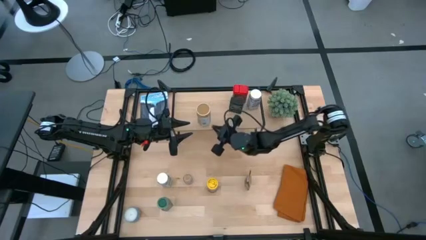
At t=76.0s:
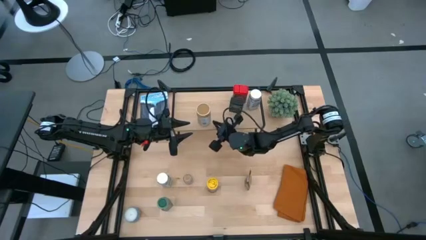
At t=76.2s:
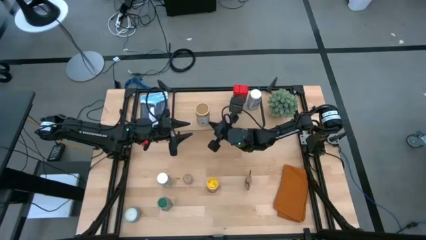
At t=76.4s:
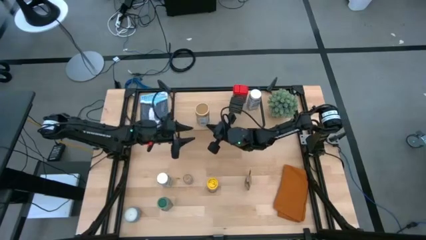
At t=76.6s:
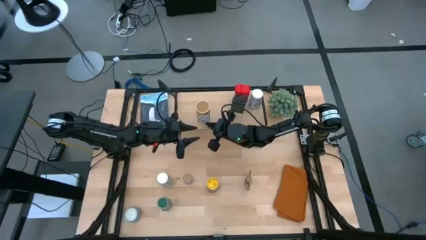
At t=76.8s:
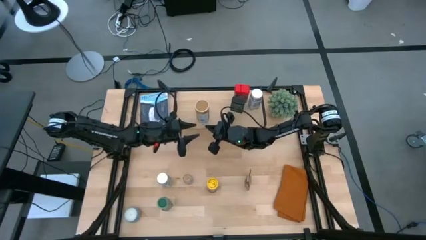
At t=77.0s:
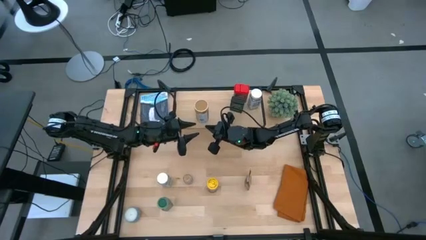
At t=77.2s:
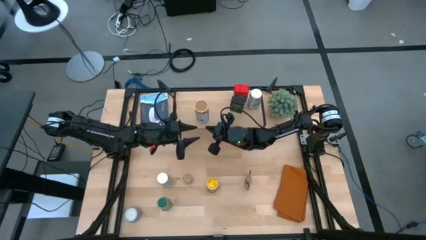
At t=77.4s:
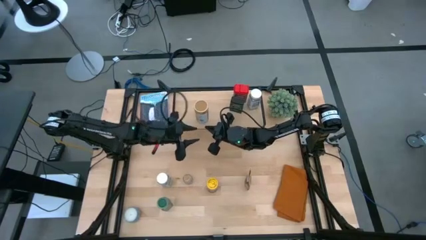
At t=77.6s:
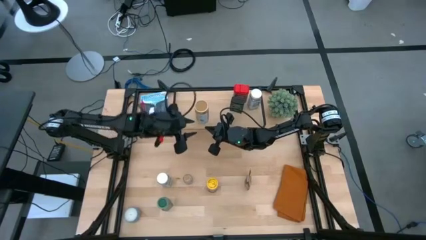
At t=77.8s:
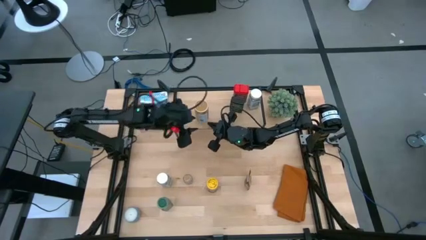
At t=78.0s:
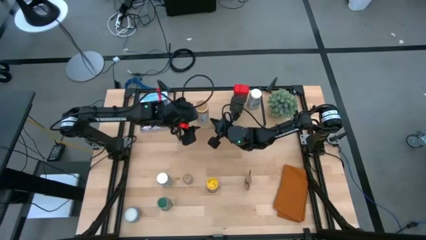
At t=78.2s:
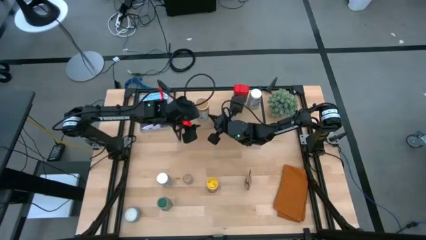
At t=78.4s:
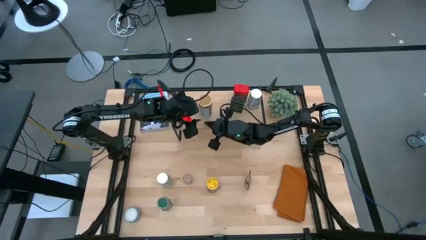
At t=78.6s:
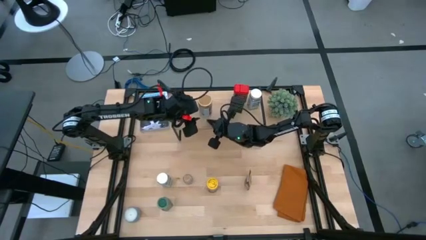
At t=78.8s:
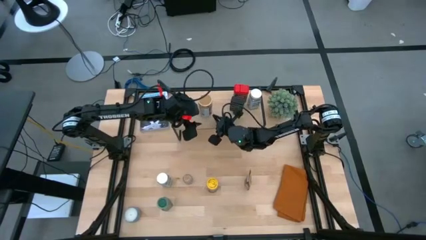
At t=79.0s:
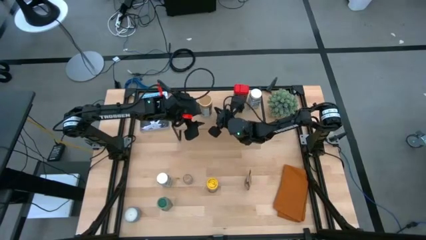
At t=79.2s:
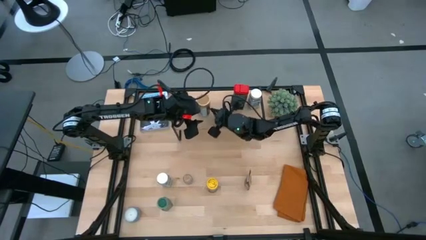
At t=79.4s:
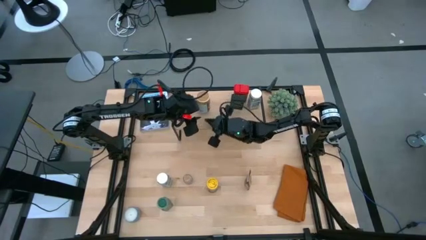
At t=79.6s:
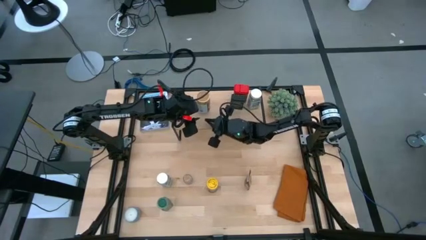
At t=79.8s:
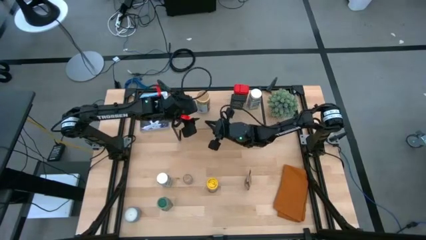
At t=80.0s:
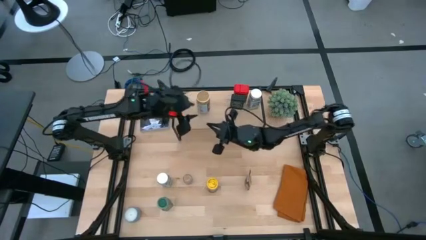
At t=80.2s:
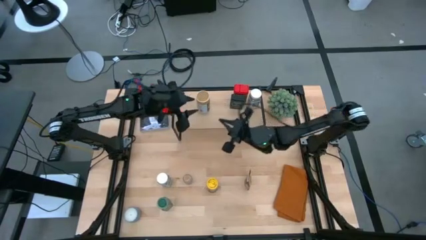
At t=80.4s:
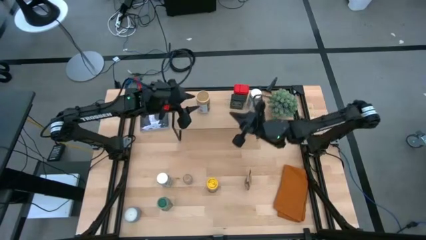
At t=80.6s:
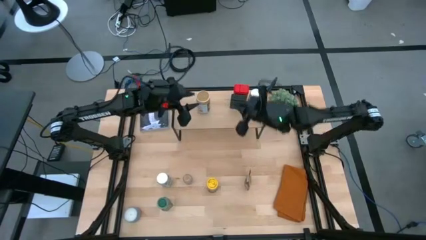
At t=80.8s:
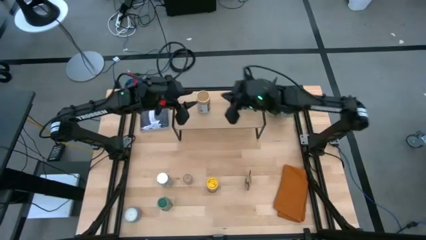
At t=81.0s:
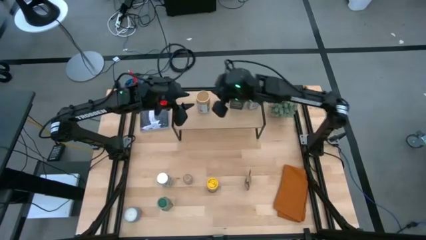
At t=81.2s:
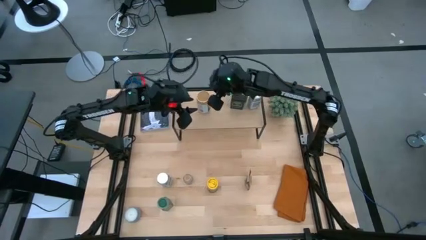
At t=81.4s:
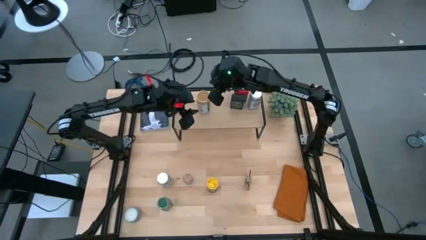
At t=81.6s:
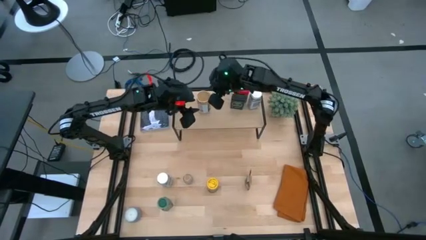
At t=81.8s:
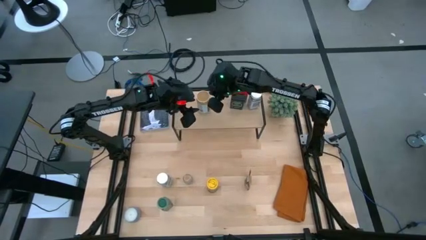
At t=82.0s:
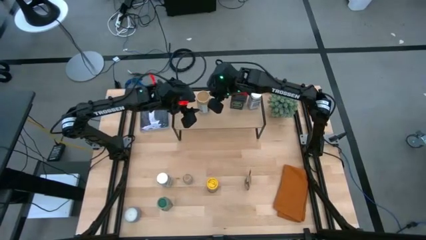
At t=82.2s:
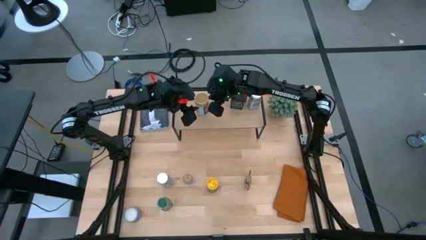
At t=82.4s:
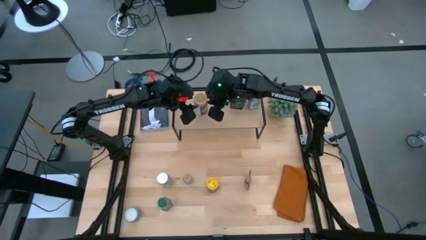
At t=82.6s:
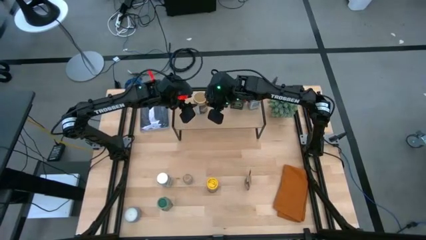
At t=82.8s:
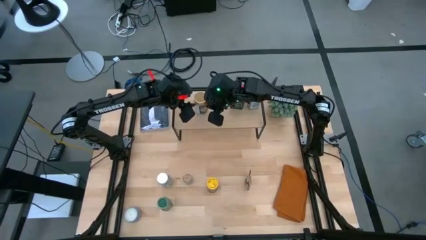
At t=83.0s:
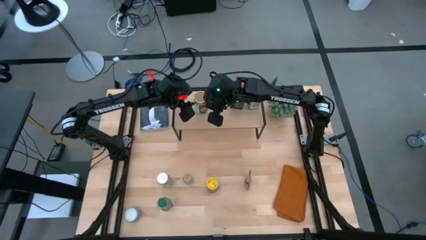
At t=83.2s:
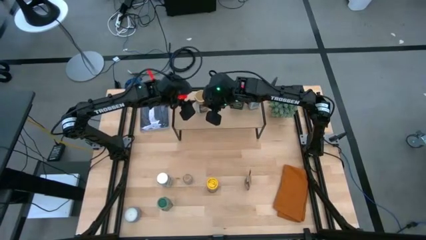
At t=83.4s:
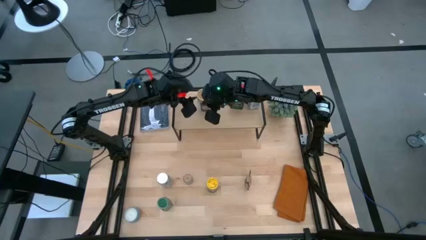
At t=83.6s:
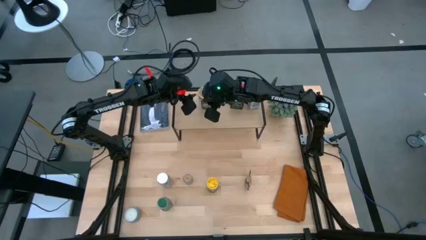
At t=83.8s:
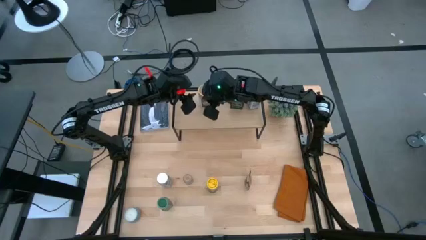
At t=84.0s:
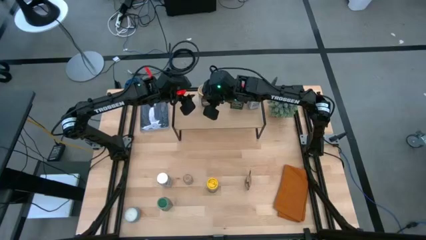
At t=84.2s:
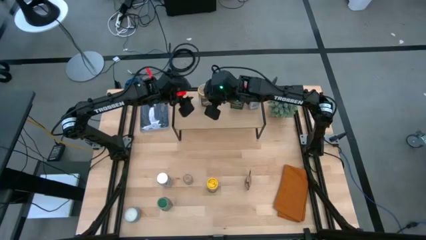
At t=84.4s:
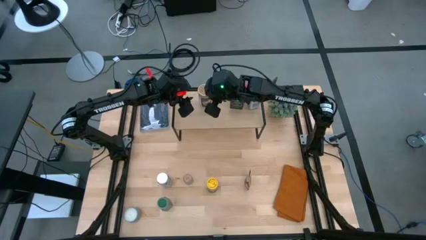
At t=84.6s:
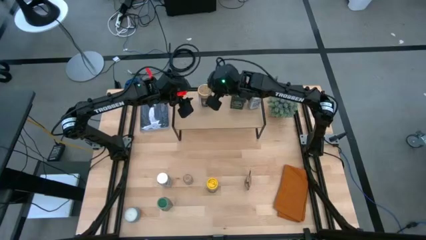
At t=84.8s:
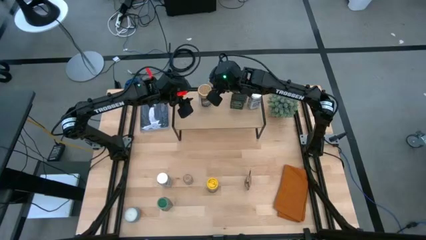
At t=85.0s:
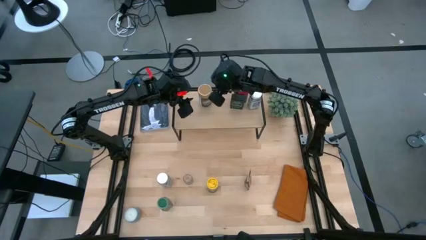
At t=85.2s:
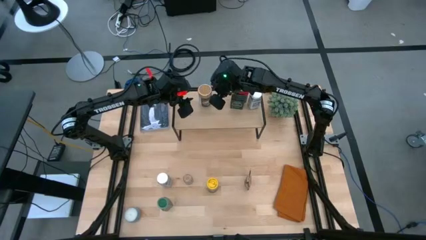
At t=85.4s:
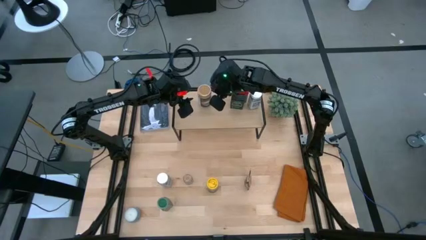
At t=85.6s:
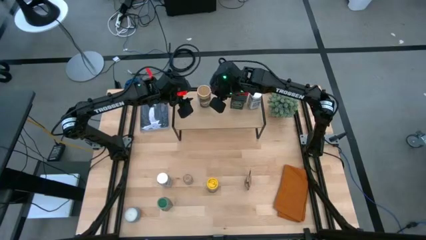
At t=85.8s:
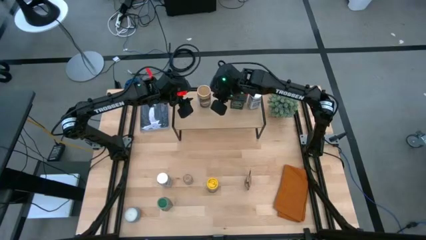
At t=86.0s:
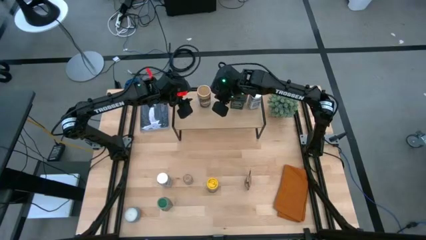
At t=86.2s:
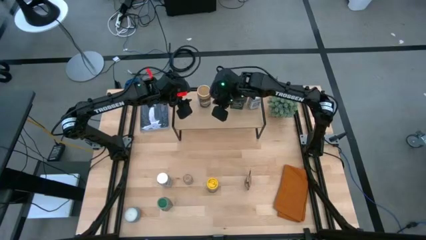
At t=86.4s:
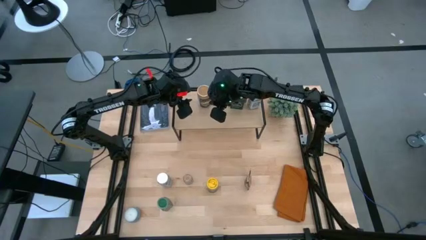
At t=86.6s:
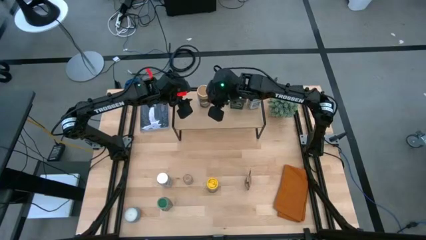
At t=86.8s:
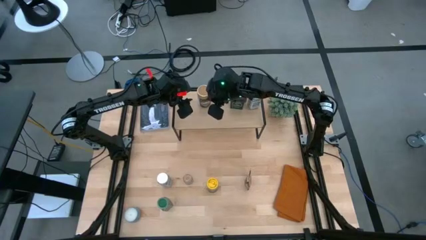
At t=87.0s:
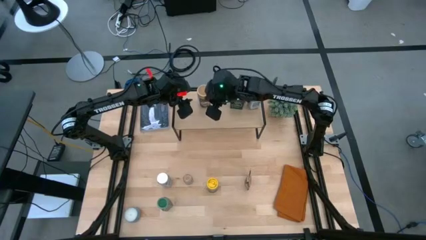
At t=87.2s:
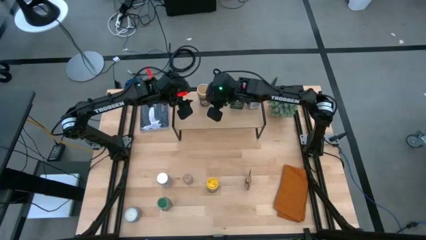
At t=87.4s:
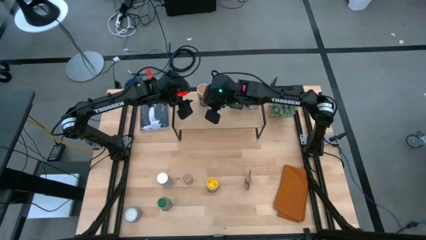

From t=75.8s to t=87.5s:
Task: Shelf spices
Put the golden seasoning bottle on the shelf aligned with the other red seasoning can

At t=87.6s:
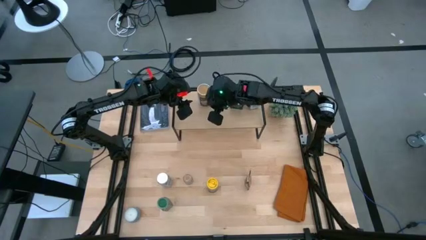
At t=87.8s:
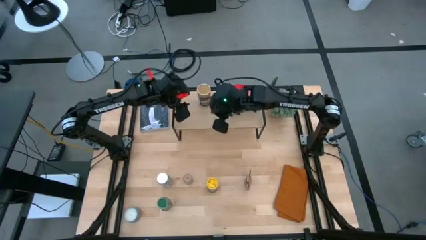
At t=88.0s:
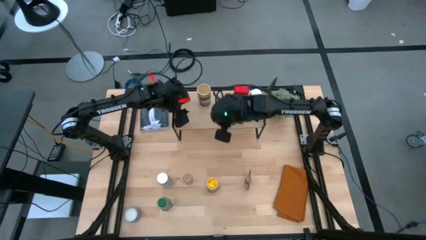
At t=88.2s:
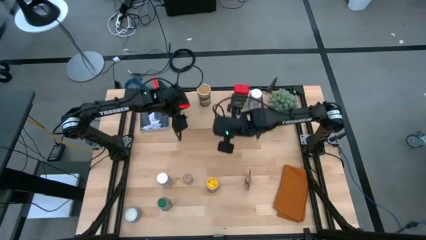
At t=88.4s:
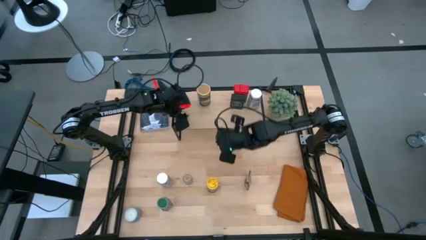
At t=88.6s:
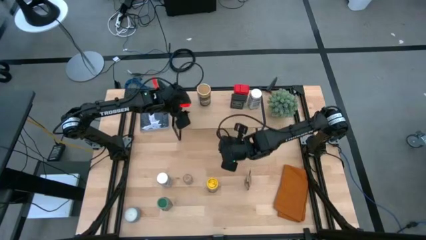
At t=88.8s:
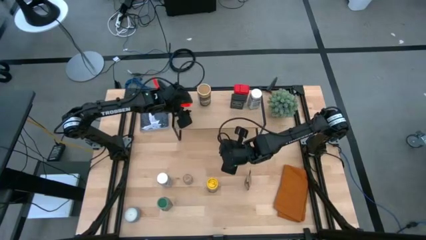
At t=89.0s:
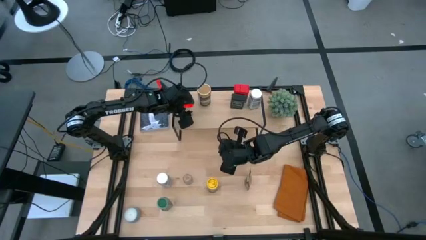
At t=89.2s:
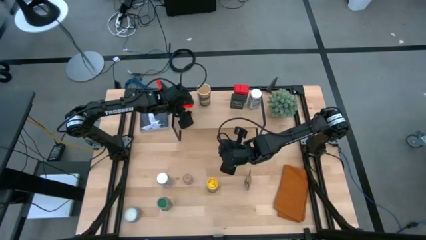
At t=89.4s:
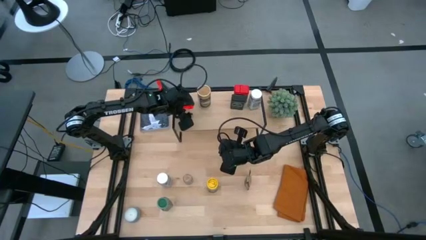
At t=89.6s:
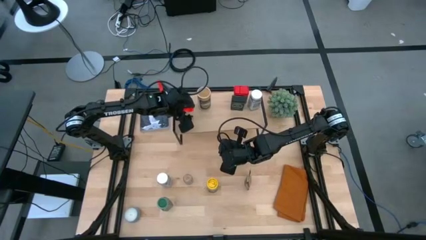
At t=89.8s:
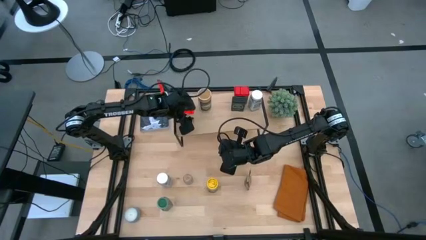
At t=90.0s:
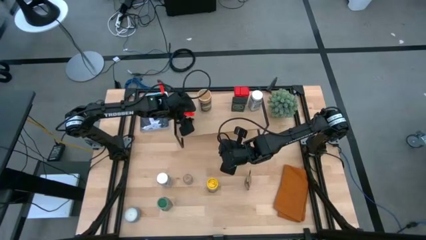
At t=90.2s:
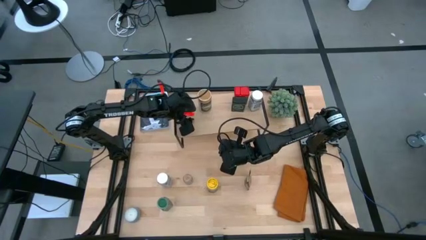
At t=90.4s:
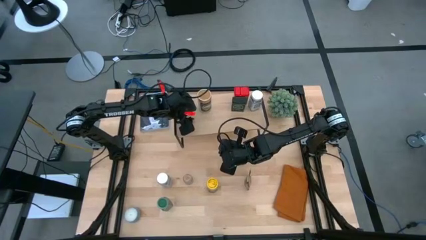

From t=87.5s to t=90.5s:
Adjust the shelf
